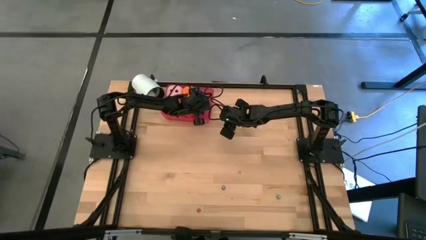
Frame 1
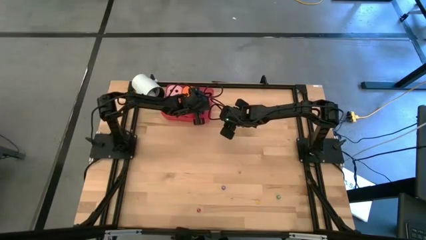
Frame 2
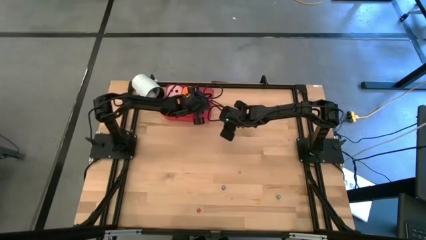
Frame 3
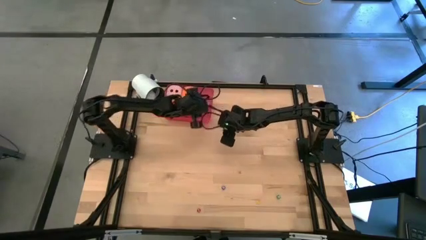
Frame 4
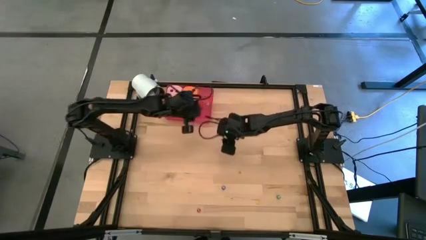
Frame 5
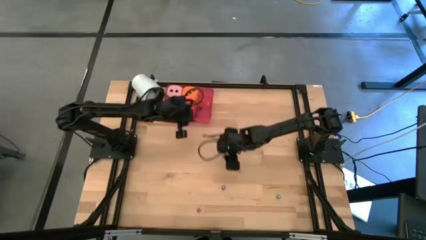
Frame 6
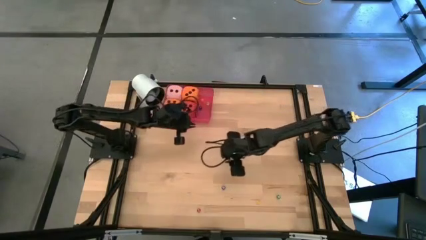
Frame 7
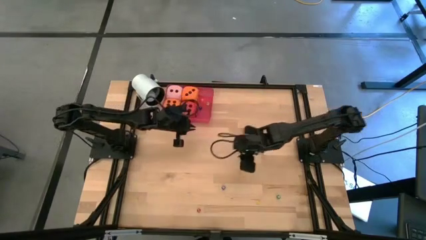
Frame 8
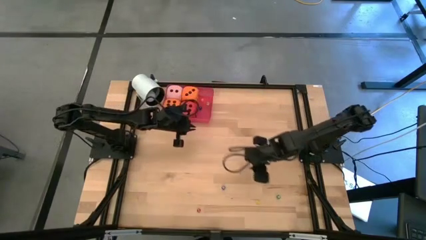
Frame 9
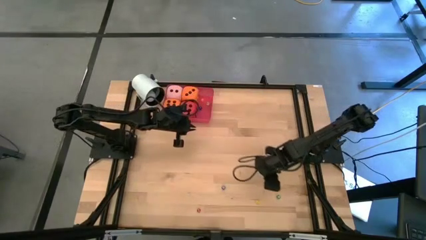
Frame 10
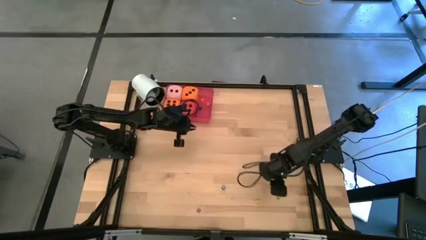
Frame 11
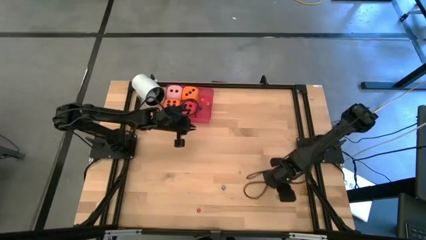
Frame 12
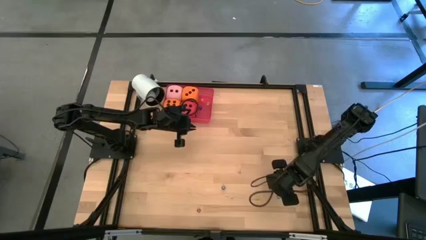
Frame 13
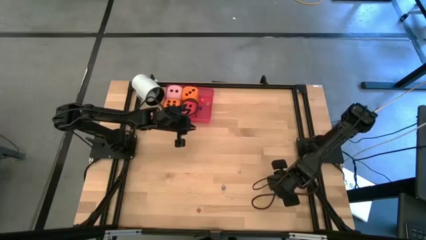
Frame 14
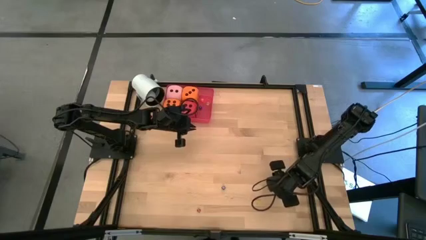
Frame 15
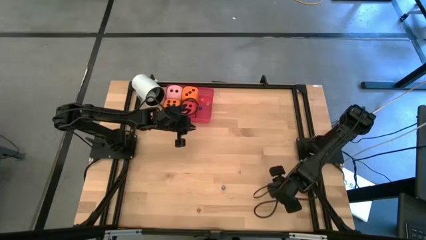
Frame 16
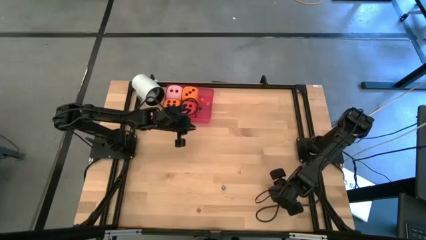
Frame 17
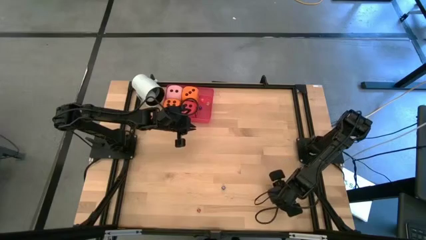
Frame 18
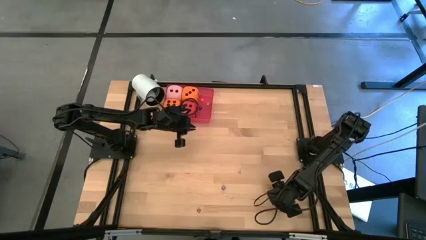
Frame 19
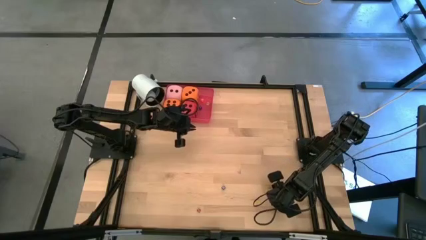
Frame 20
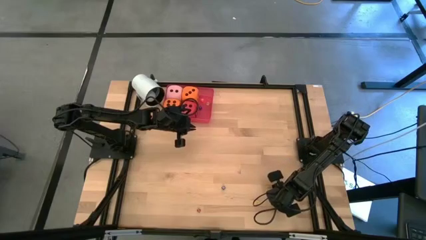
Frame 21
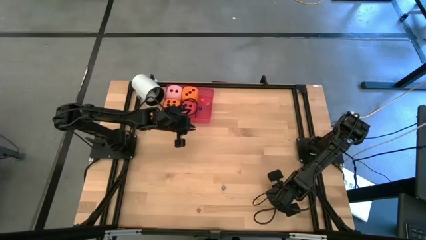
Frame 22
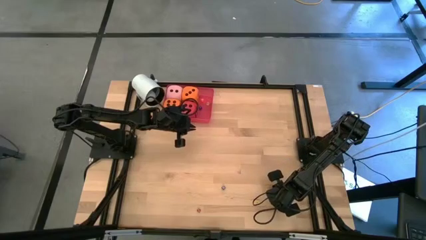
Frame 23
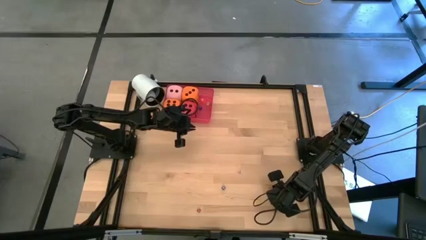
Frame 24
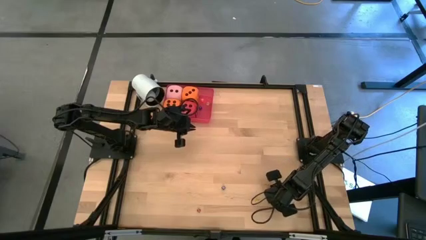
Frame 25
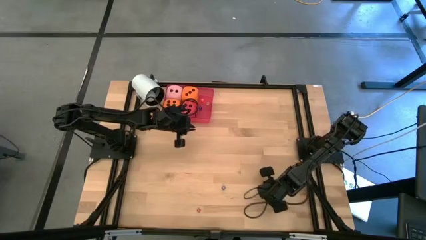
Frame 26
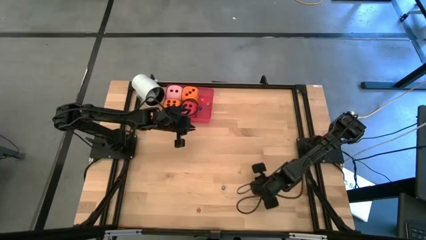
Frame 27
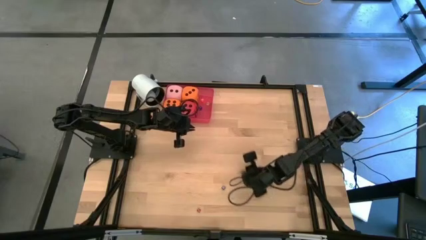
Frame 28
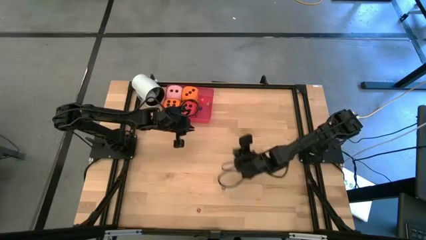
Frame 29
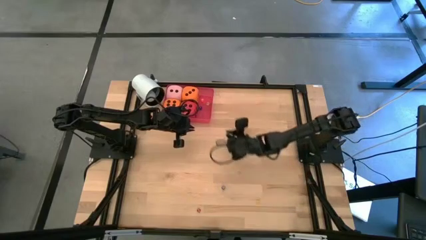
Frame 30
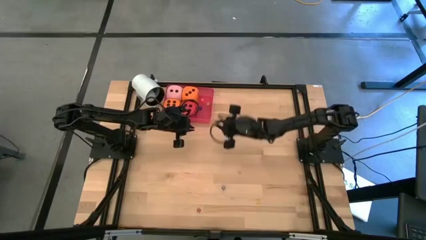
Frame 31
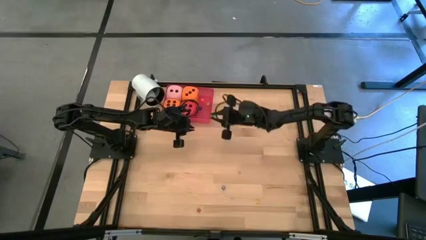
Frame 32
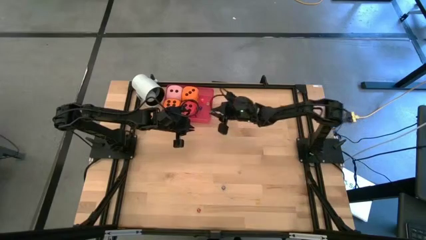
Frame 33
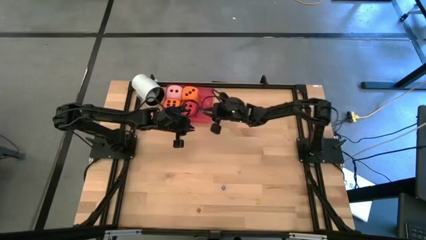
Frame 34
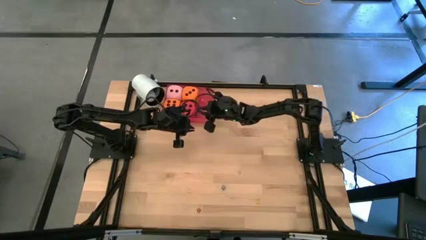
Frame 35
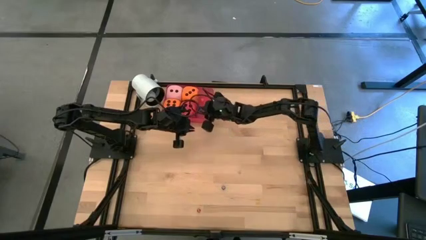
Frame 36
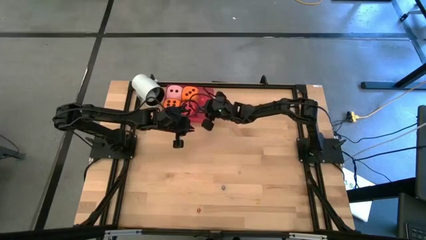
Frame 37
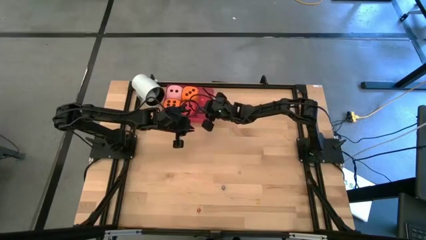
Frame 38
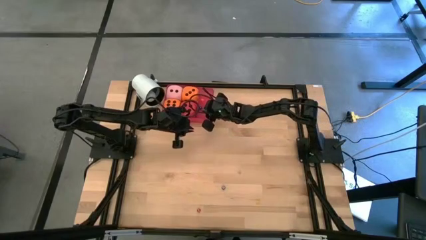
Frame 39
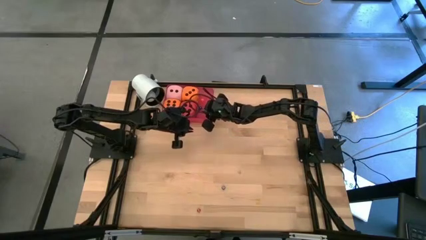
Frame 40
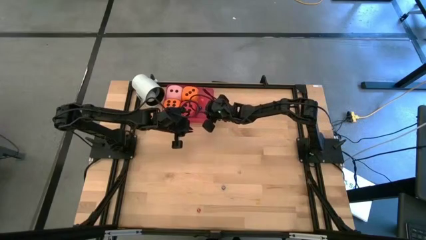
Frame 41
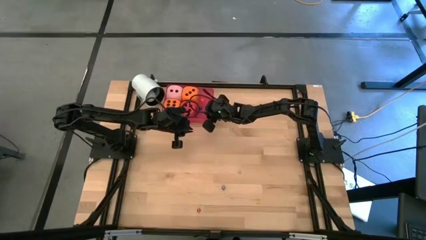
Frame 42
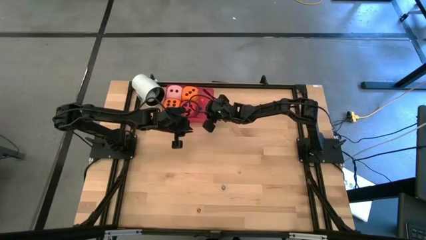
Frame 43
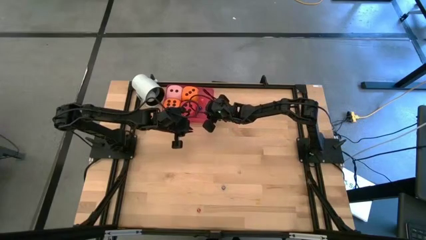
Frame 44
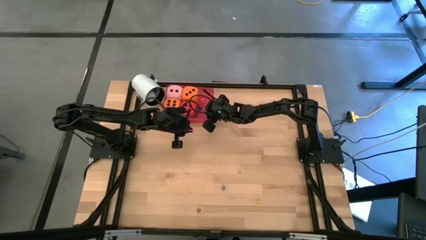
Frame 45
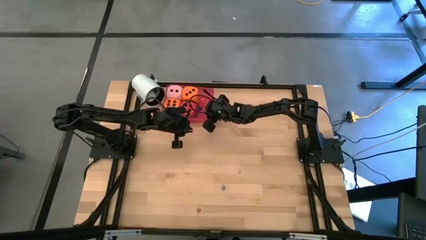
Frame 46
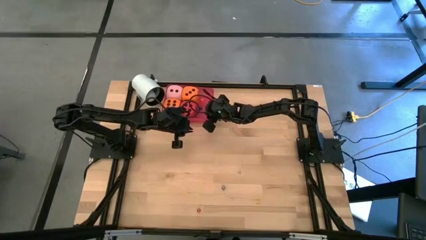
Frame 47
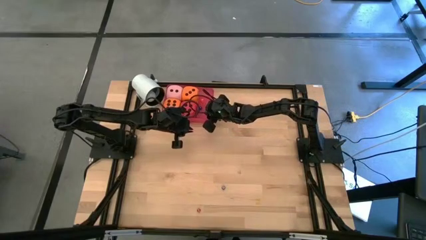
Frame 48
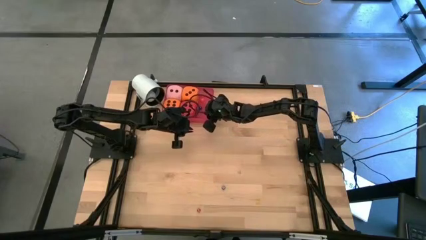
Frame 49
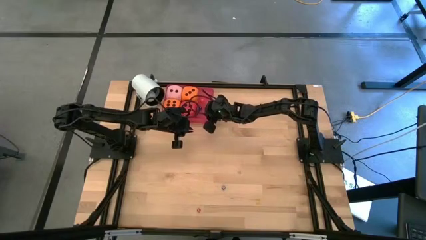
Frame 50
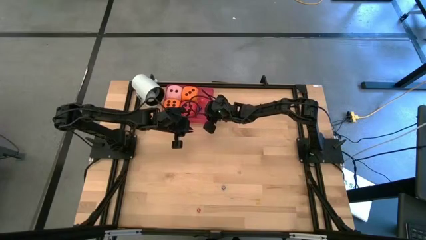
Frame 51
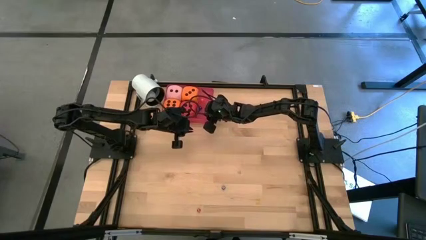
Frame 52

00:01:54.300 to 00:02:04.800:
Task: Pick & Place Dice
Put the small green die into the red bin
